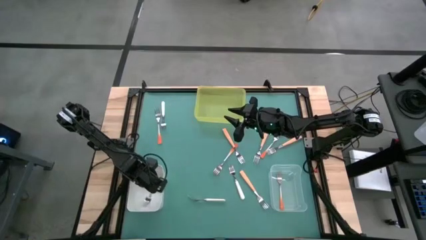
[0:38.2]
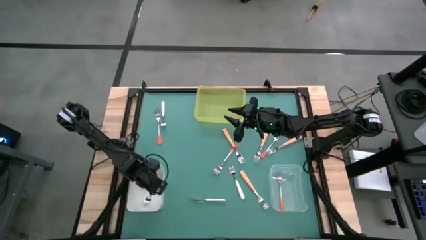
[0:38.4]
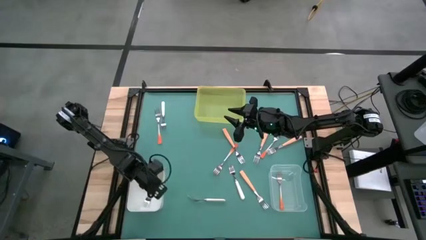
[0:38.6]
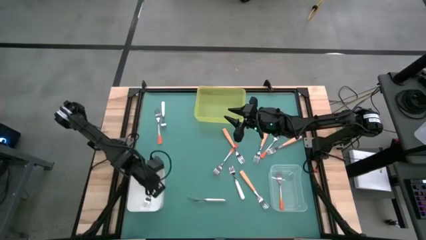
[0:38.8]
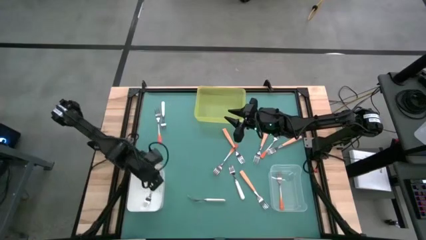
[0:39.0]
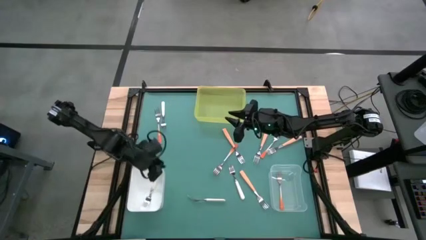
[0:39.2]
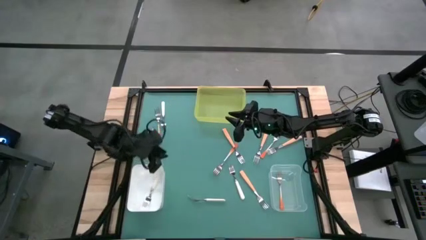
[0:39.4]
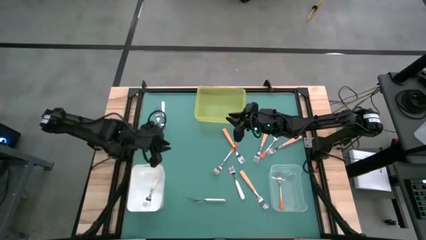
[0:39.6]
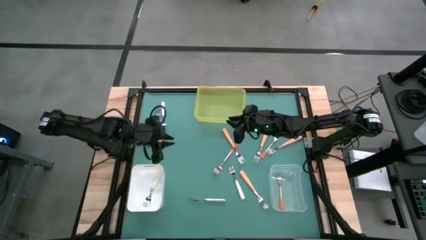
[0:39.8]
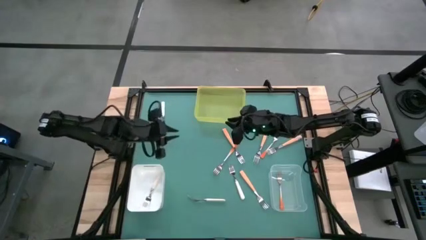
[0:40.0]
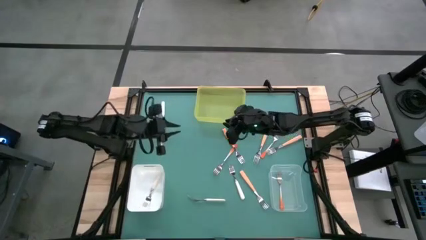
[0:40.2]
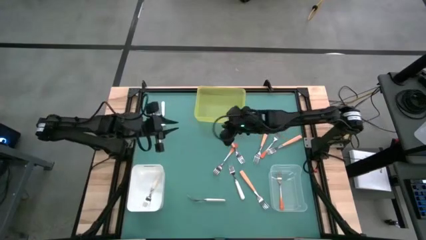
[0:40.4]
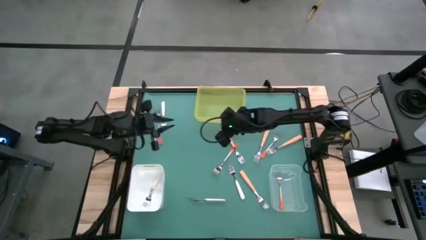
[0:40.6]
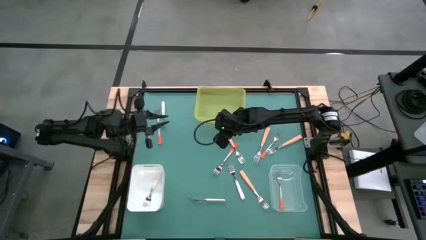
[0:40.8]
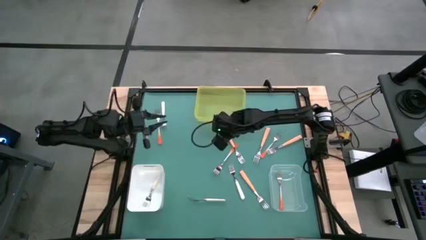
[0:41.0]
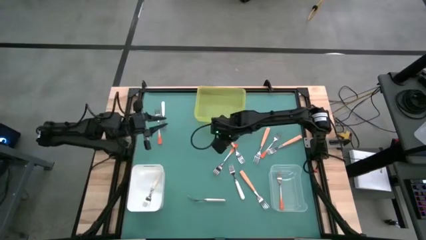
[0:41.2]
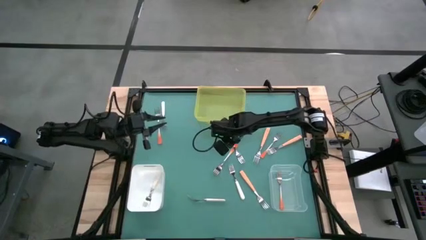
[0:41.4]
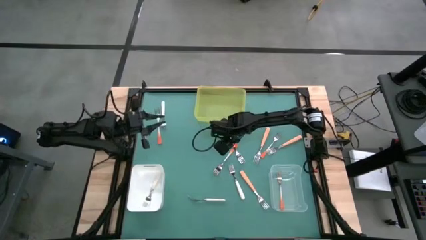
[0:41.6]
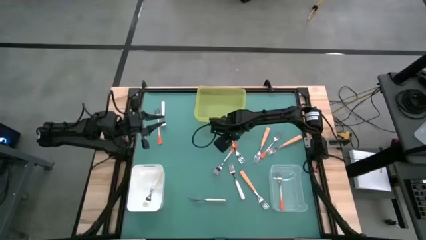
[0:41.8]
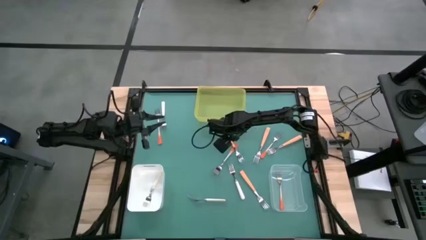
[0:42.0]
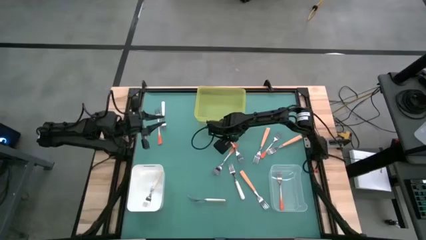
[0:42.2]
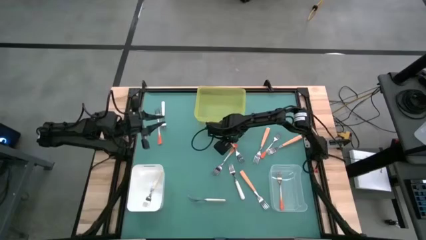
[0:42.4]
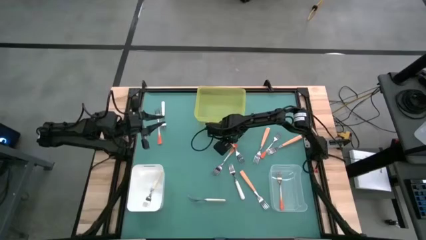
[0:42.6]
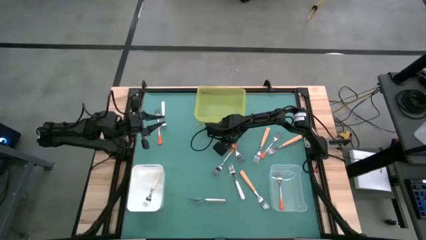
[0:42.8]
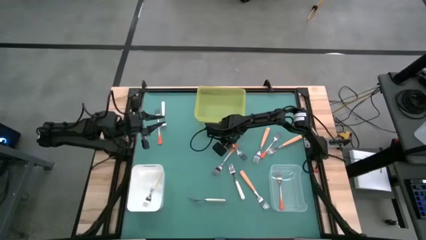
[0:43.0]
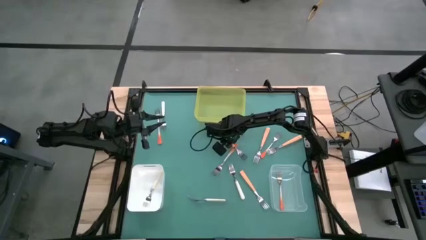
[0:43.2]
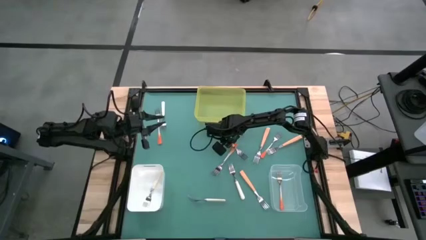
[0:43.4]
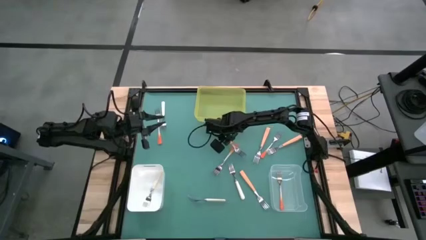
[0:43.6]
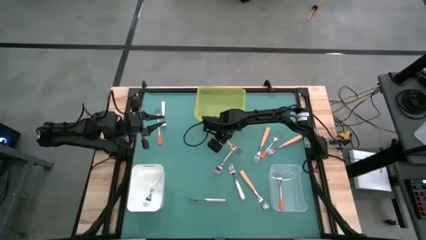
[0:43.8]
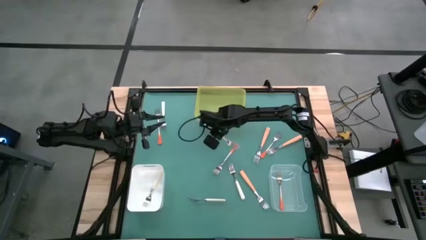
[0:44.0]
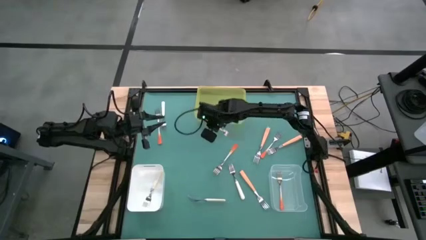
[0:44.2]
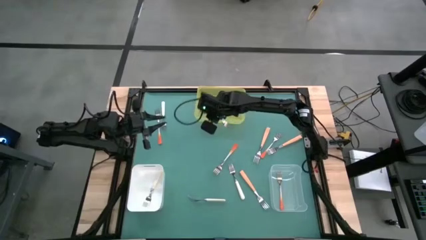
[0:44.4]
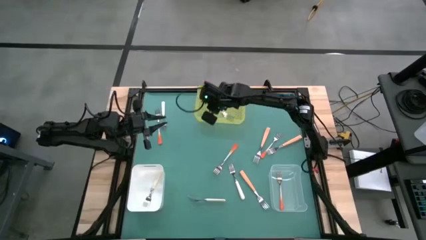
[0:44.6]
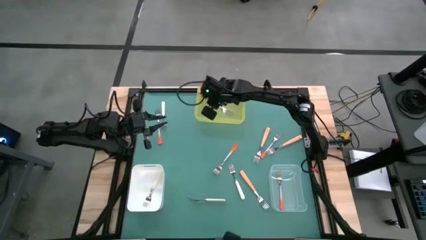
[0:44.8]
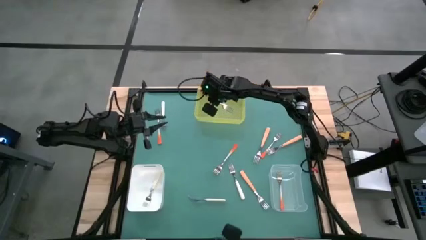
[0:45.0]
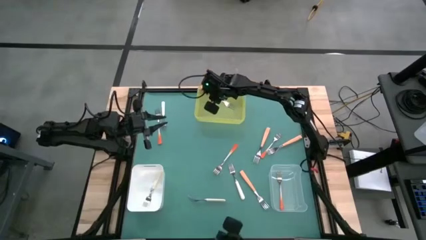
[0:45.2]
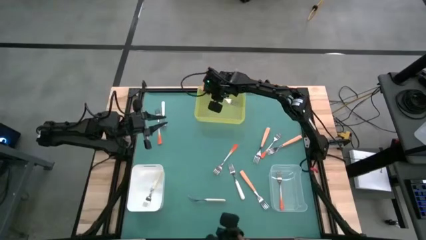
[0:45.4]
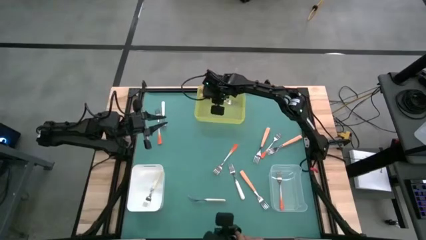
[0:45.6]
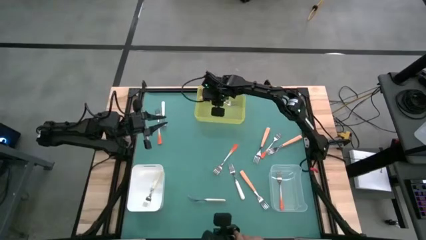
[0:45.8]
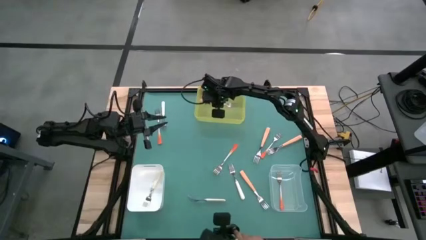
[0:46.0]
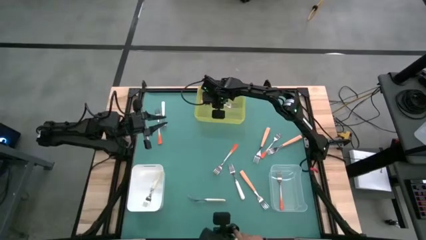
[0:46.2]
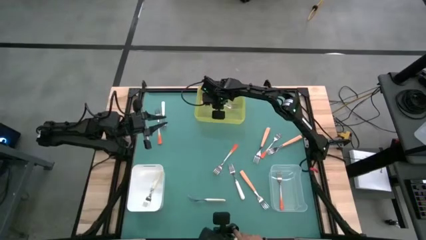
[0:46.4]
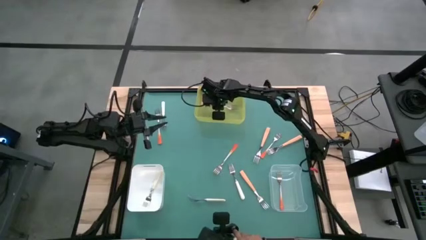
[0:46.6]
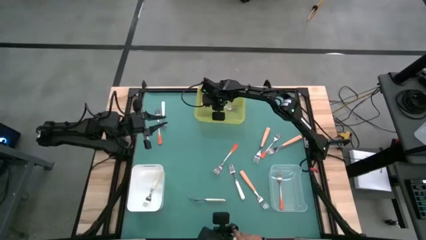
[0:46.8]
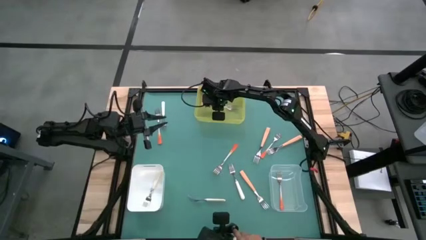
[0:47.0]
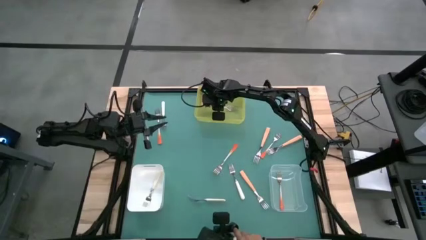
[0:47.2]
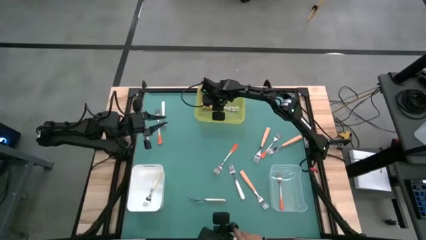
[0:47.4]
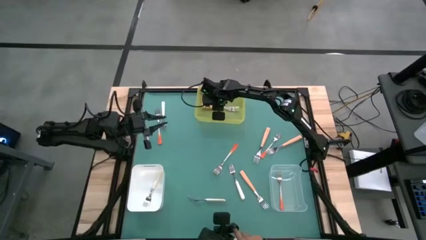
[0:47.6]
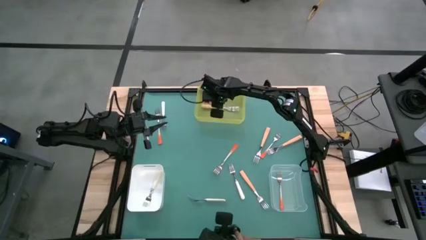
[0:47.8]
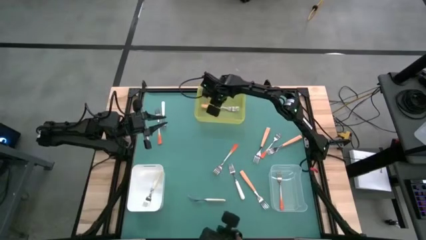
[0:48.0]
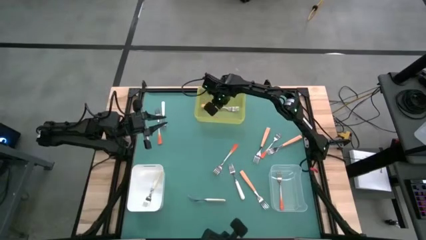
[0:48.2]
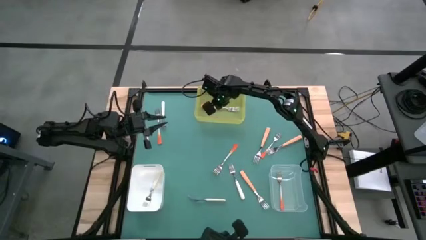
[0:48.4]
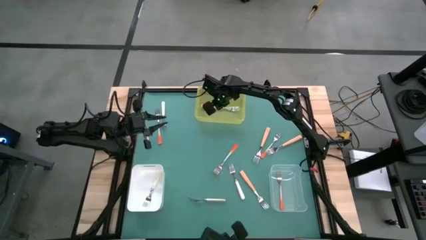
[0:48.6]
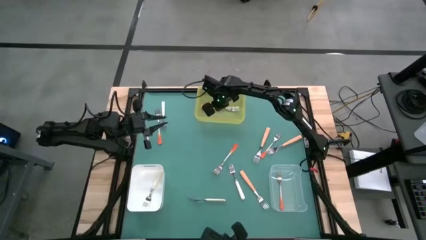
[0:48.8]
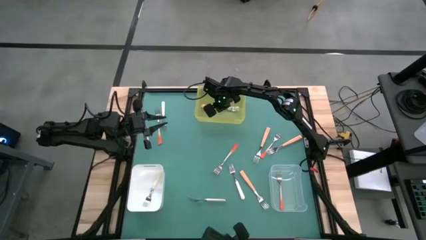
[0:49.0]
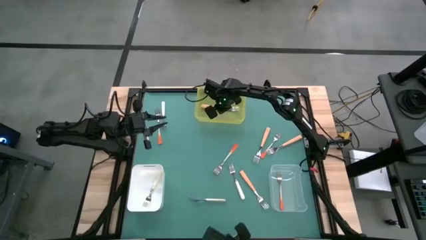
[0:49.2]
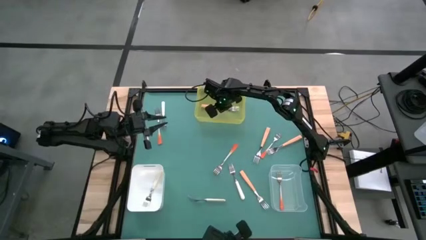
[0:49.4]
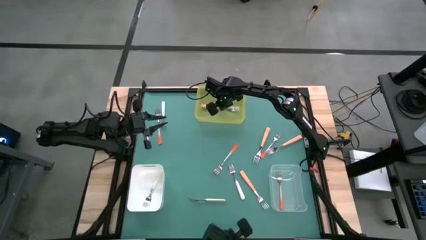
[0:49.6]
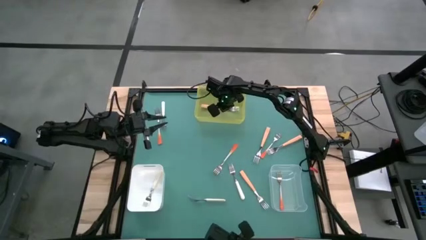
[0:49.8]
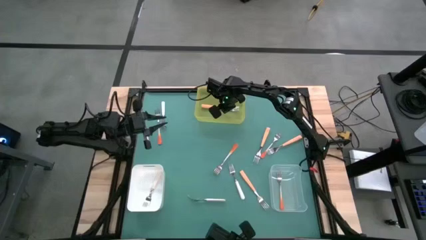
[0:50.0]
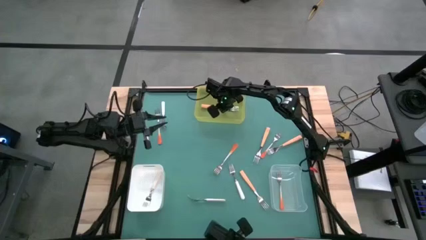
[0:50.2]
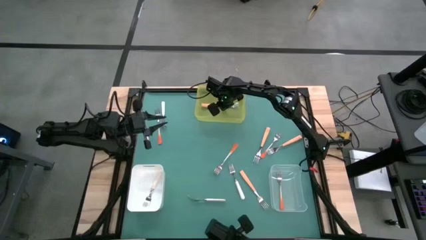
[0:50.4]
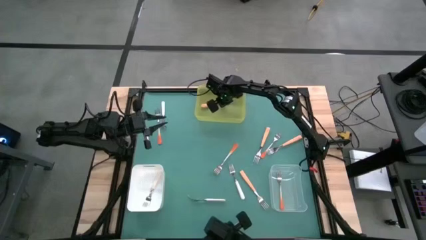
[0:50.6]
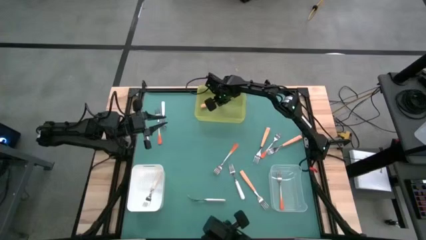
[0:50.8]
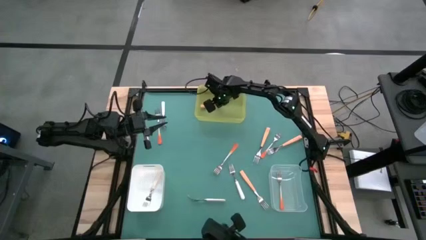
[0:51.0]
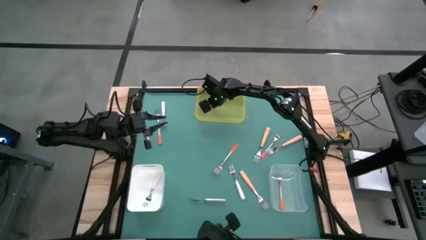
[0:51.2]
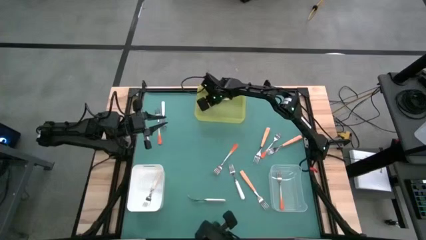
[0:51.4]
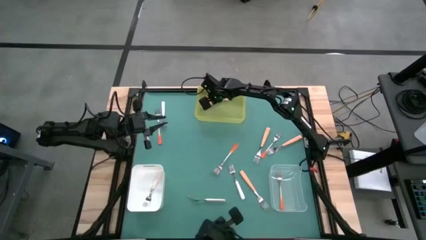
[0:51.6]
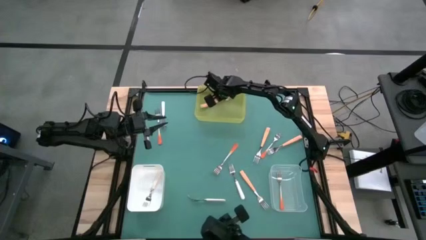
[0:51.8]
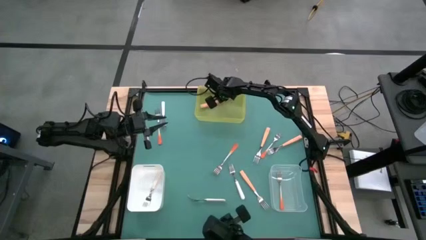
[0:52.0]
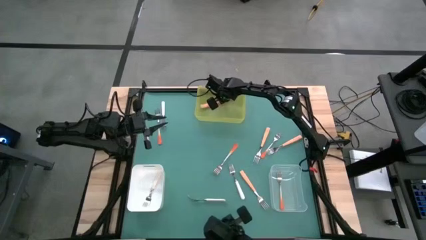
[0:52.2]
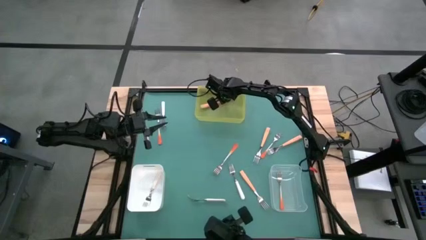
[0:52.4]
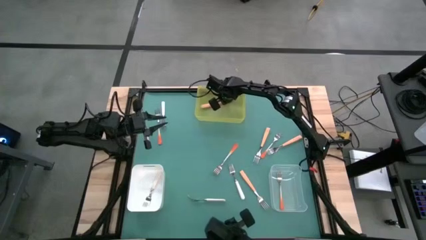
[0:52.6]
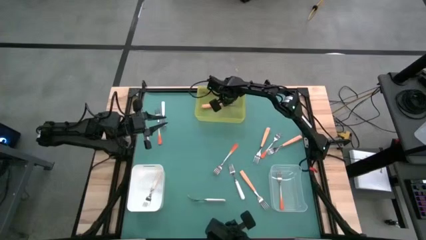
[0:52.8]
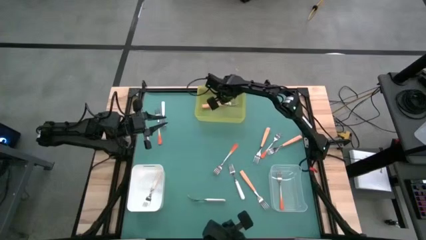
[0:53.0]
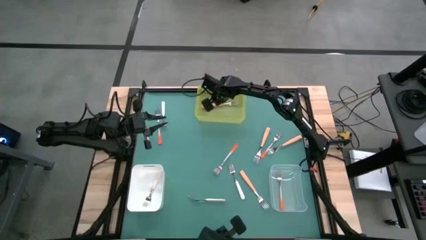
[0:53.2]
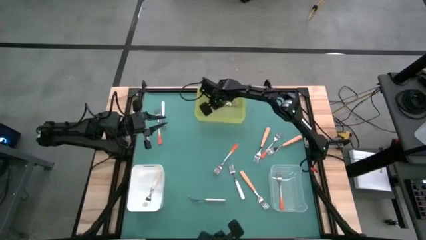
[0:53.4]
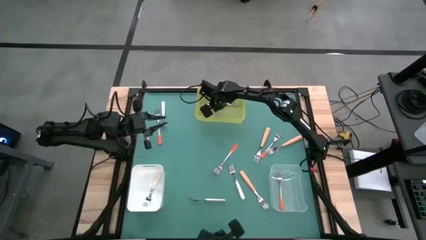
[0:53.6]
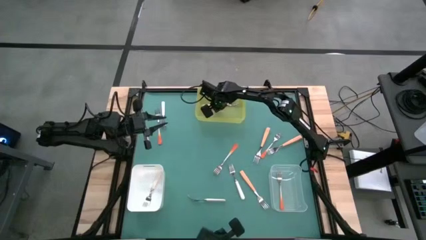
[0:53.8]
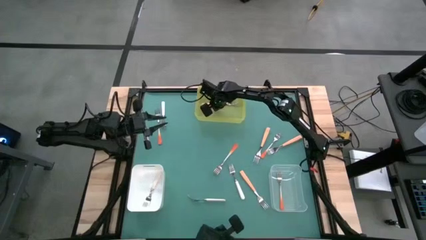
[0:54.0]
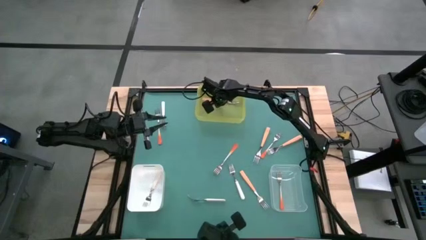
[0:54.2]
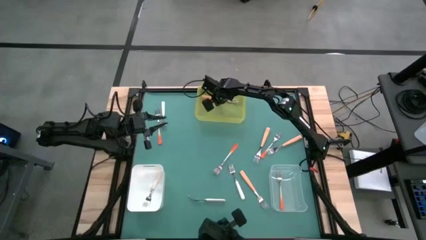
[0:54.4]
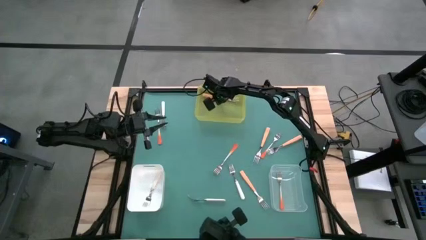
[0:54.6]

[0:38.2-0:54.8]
Task: Sort silverware by color (type)
Put the yellow fork into the yellow bin
